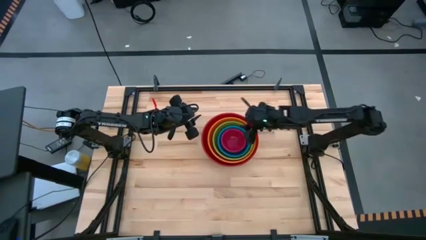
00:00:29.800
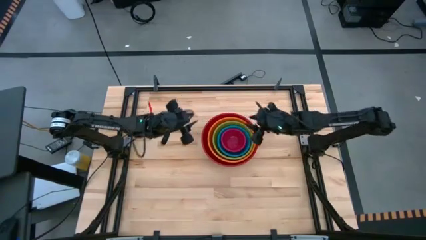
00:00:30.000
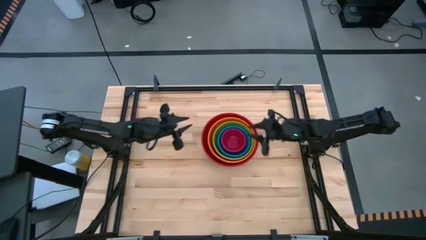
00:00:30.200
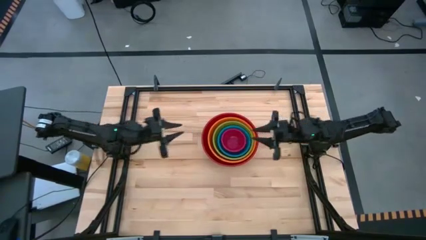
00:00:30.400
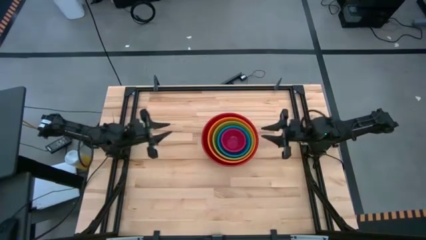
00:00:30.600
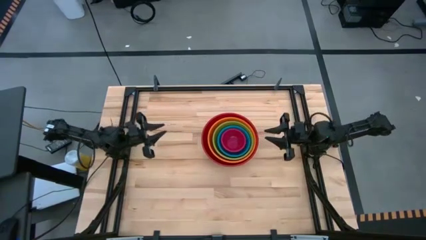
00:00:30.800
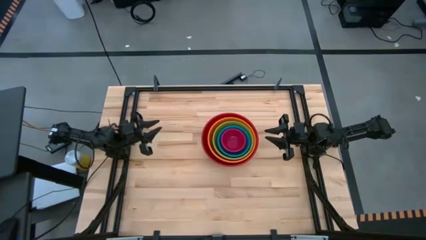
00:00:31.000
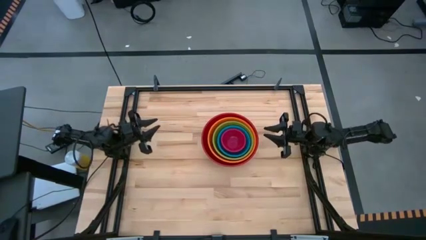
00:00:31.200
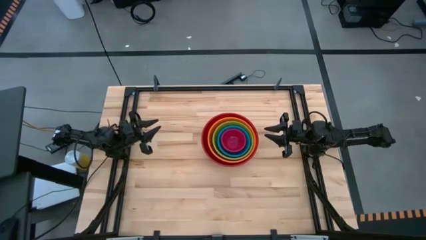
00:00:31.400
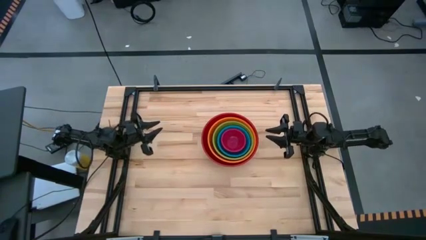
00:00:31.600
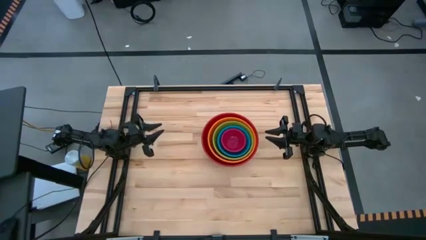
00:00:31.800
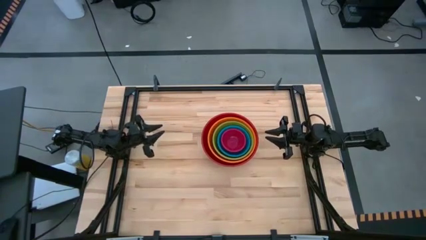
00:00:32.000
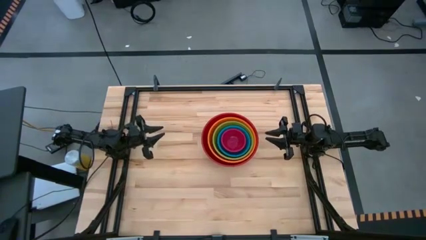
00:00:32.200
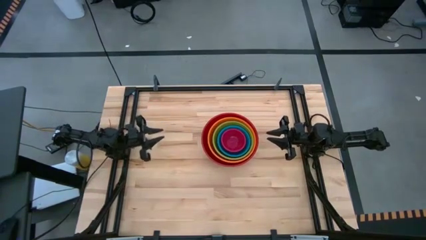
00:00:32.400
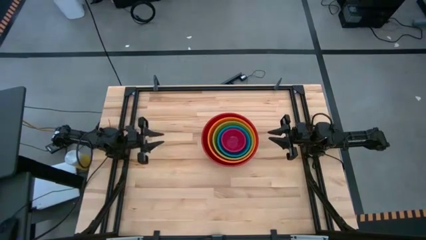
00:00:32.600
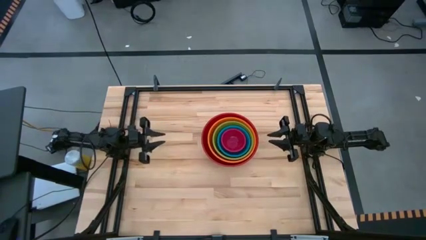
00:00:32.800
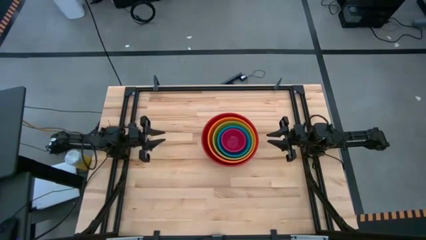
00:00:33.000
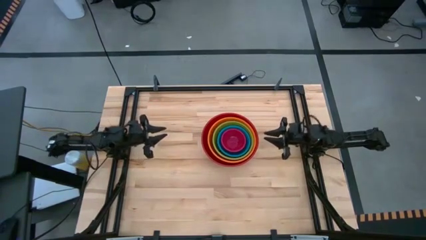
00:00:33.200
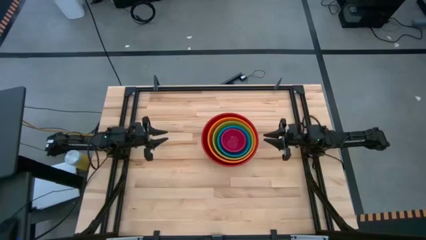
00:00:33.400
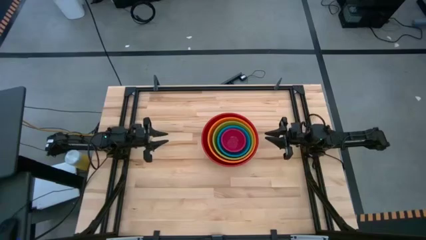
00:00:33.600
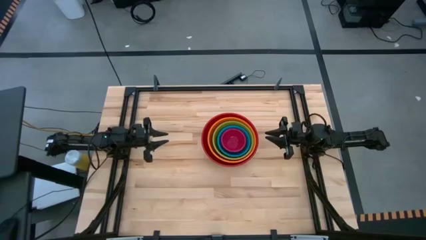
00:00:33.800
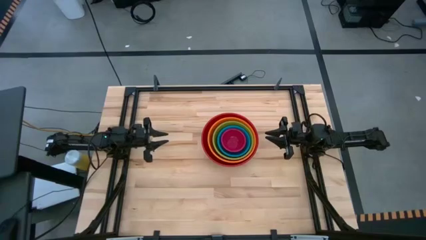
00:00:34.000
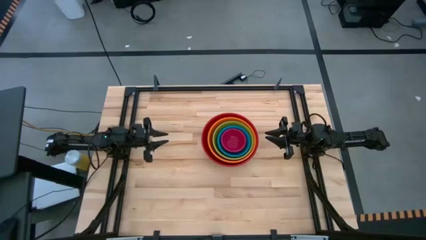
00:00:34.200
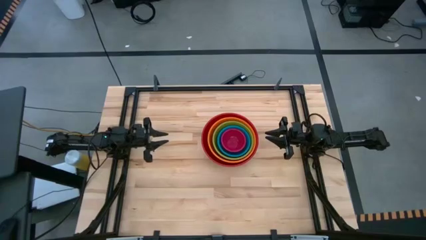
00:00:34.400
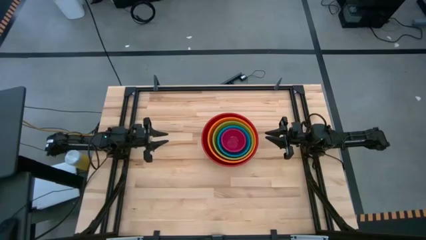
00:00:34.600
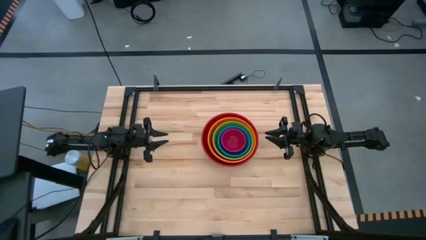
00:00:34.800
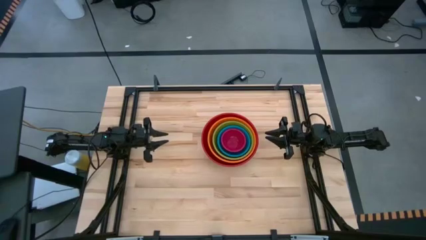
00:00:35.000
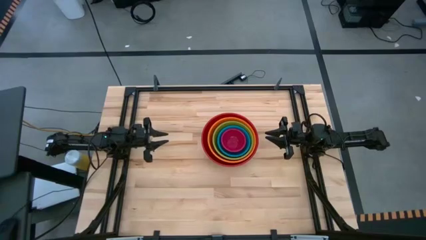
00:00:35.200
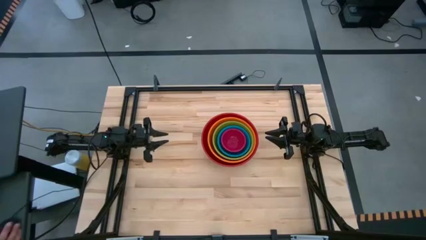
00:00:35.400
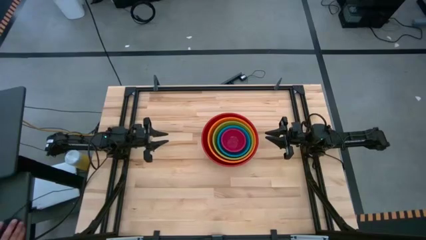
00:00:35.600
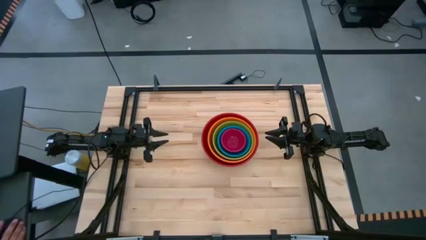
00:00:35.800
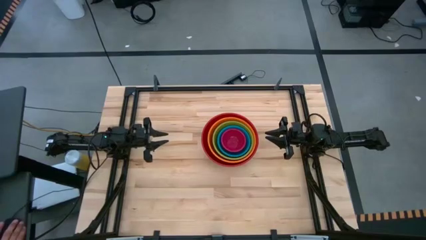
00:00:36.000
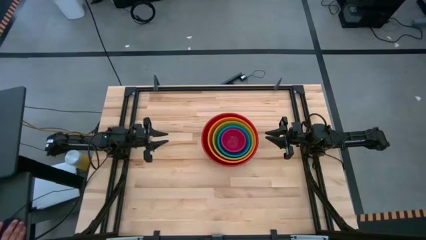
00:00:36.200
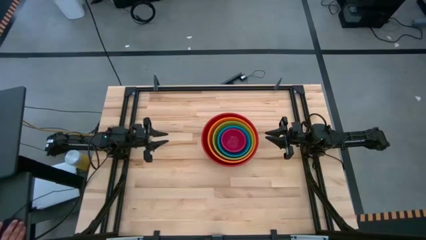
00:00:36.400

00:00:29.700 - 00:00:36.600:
Return to Home Position

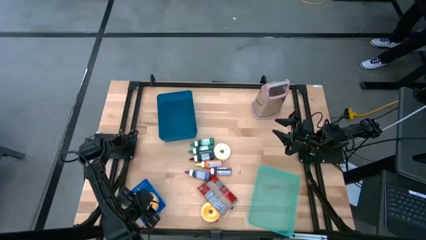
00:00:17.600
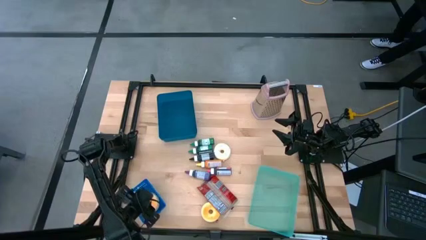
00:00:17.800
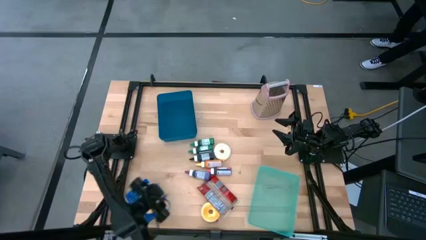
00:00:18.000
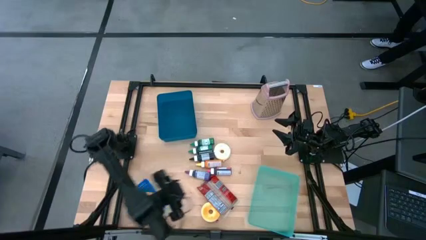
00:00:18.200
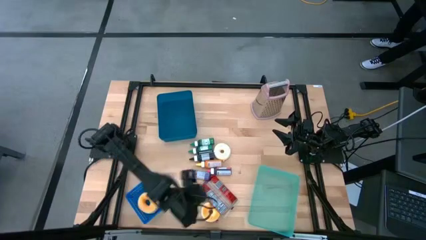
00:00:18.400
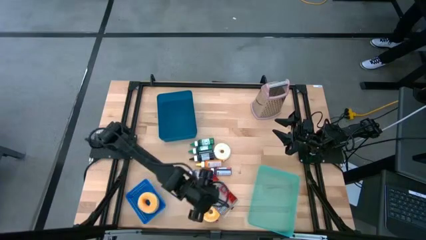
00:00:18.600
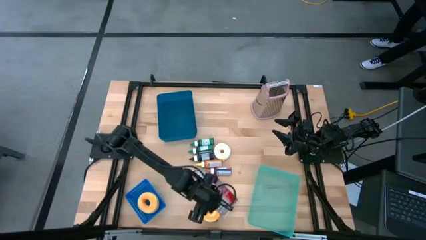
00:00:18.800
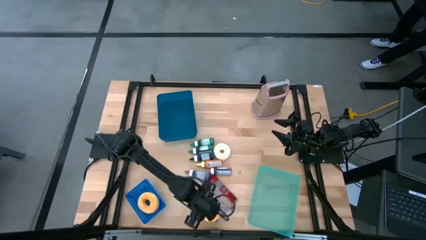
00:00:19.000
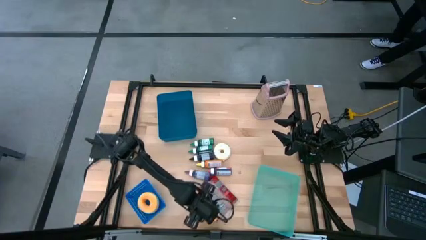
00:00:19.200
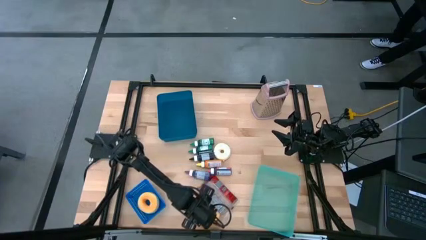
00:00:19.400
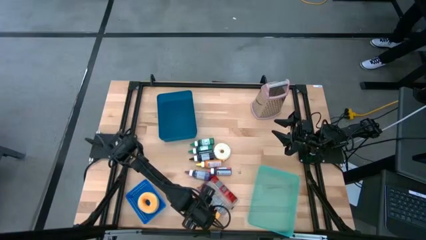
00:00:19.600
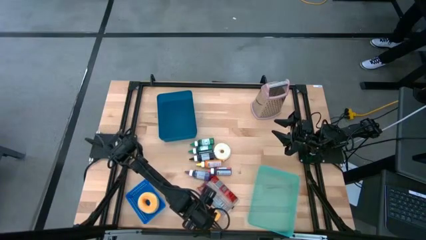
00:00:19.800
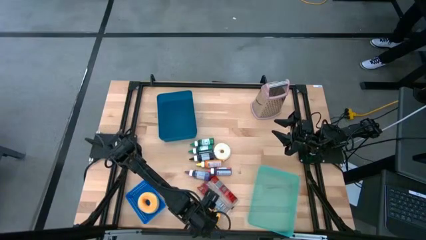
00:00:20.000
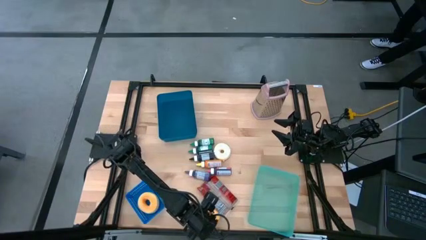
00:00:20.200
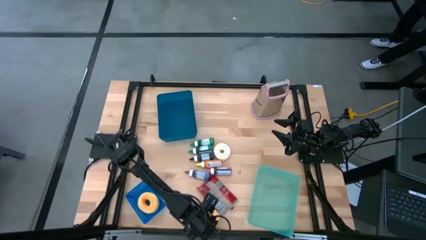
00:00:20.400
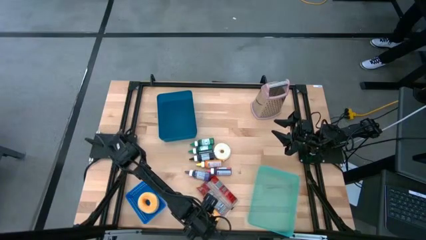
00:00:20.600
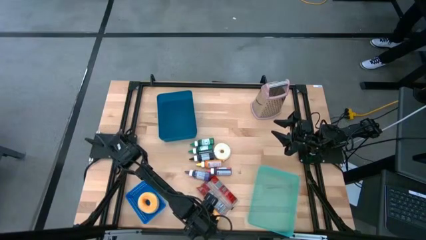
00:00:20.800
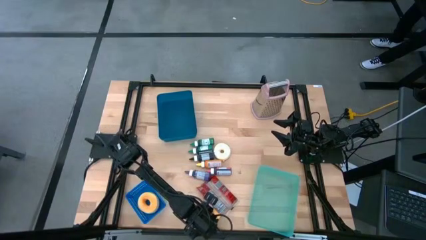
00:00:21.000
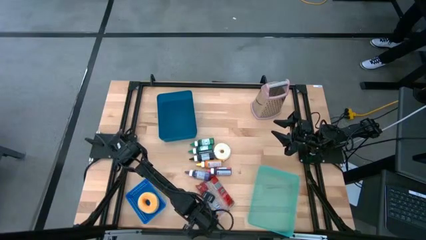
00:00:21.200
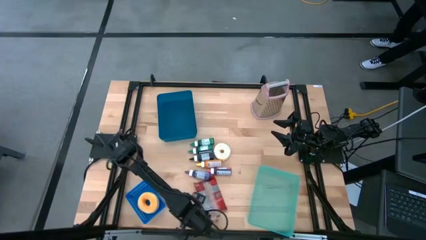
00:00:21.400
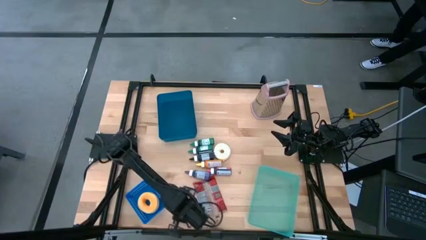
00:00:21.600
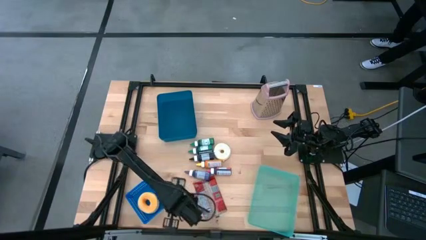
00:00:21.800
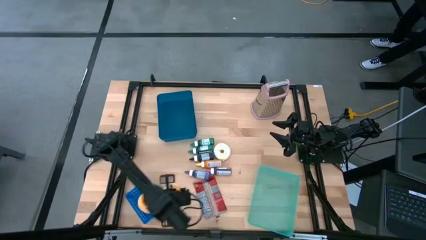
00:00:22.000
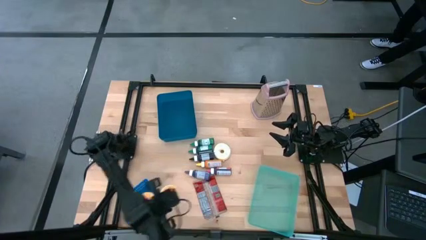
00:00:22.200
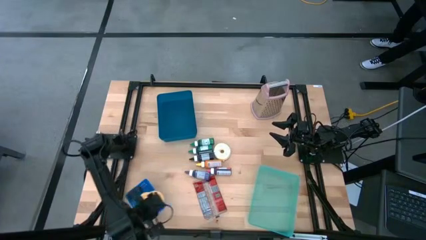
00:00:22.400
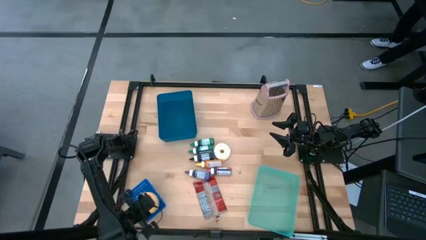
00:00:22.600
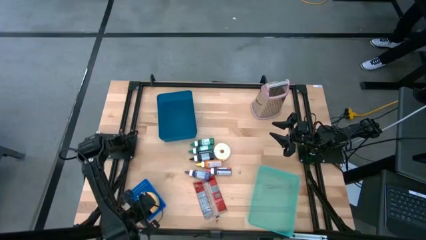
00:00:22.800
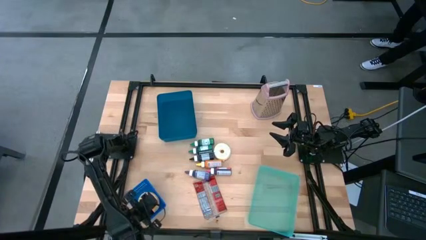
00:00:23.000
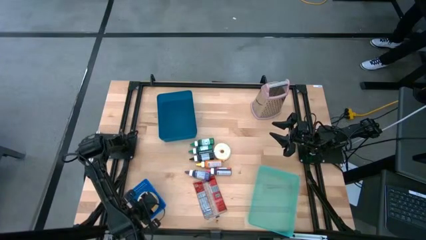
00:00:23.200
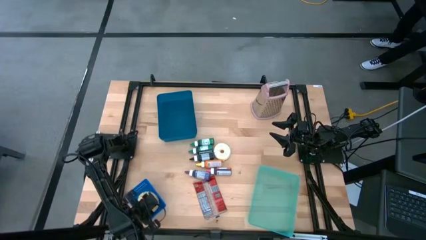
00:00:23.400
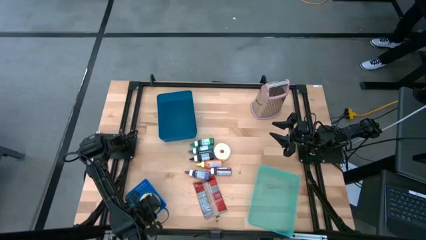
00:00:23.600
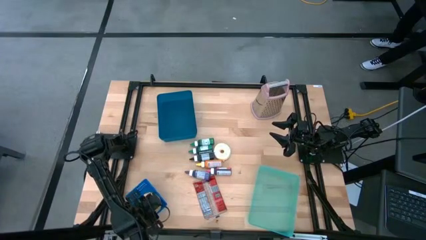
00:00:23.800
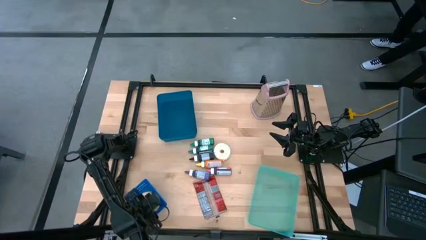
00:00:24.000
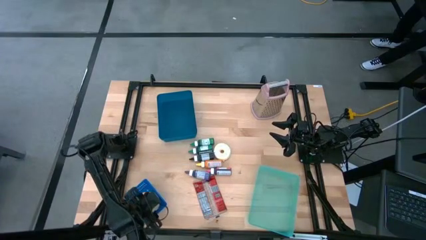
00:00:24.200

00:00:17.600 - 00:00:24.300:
Put the orange donut into the blue bin

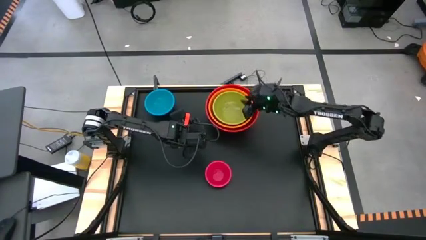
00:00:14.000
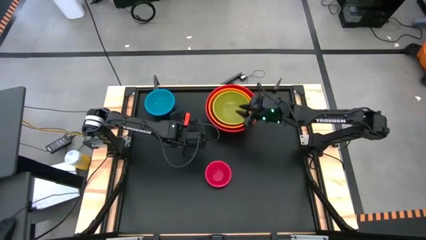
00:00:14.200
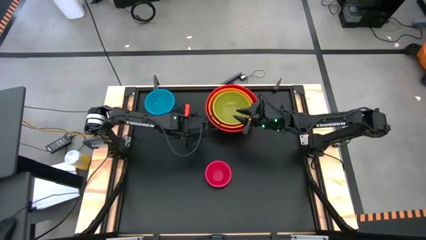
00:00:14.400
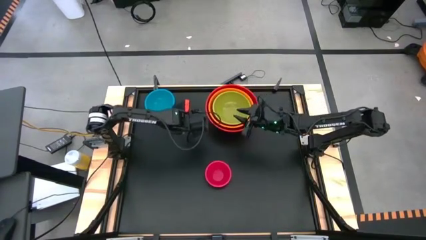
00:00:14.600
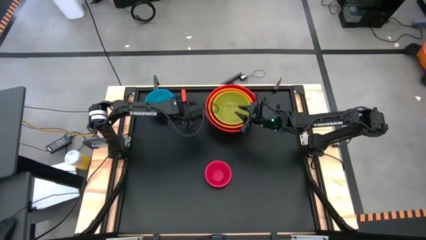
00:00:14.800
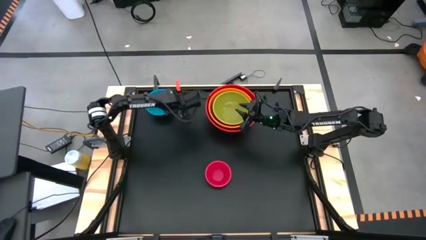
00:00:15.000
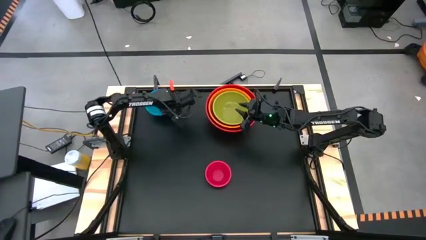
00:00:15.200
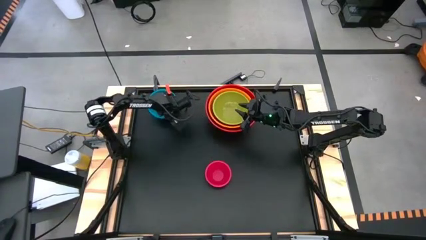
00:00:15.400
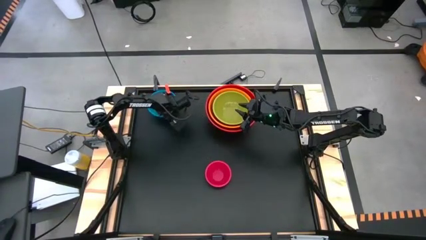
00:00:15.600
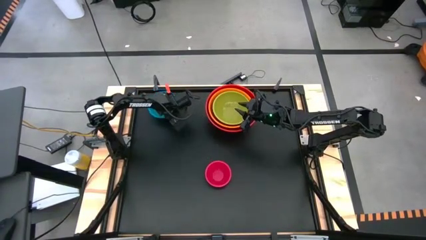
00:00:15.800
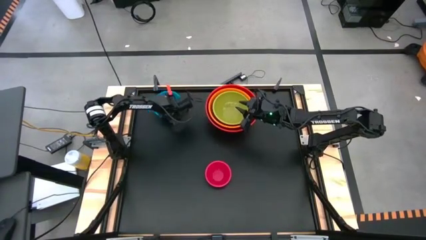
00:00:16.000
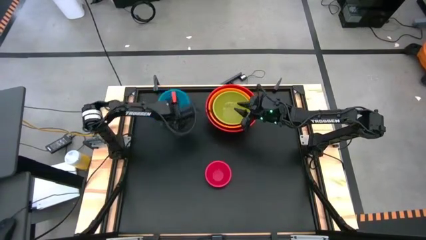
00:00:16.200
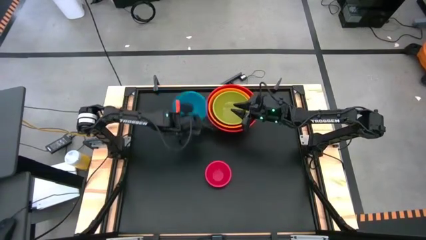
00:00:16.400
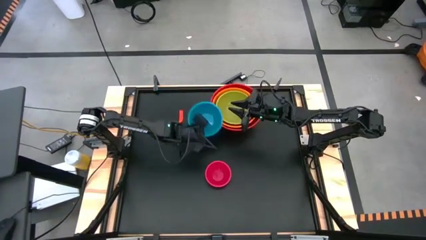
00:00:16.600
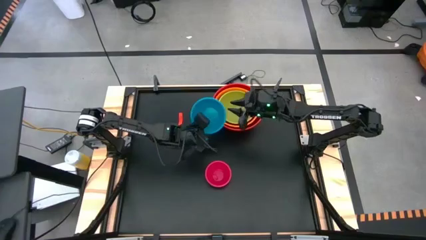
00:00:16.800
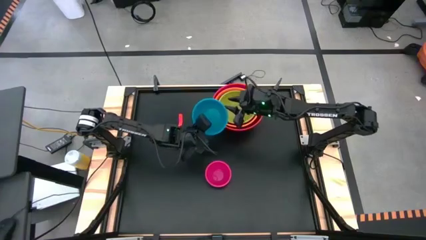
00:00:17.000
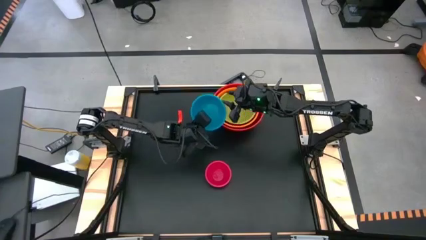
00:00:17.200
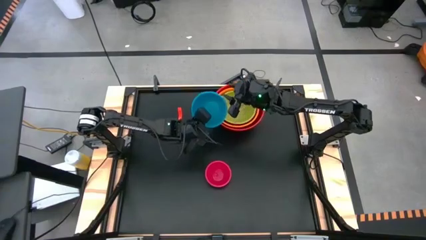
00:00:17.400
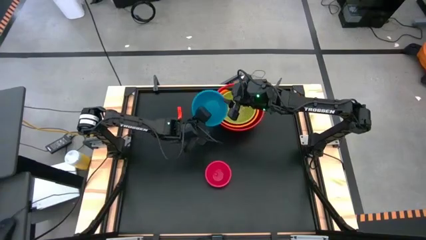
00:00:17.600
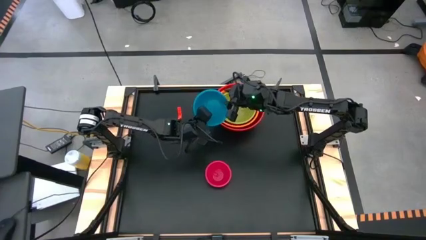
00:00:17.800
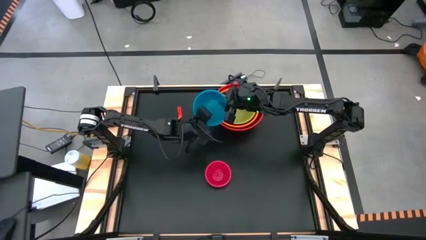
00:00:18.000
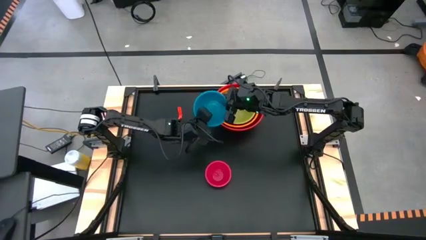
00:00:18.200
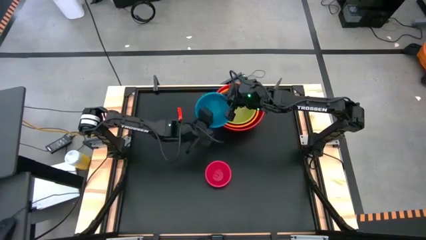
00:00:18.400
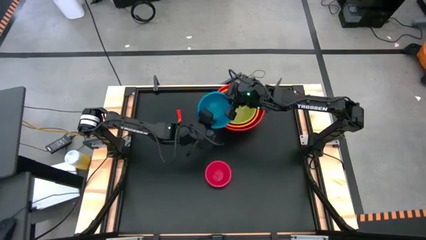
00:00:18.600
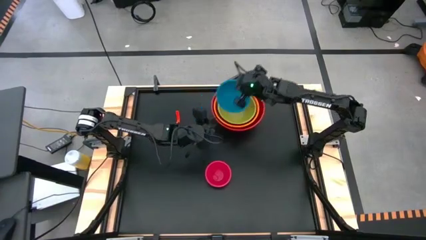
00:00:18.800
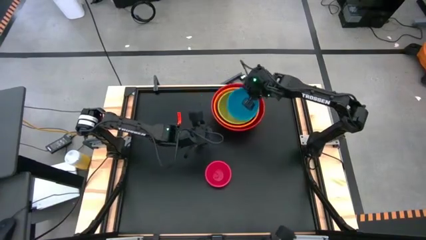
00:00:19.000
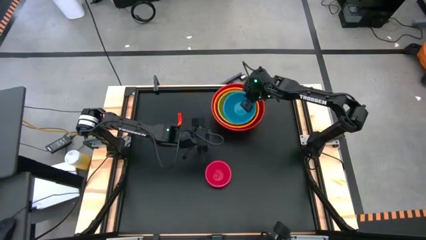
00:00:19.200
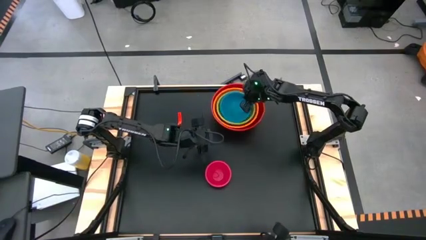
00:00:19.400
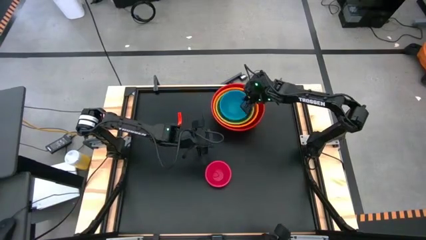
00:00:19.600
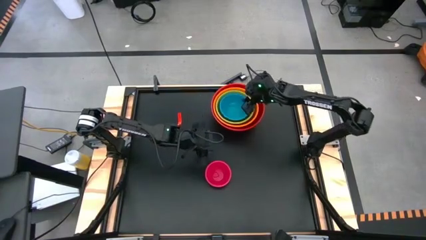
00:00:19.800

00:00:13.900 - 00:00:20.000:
Stack the blue bowl on the green bowl
